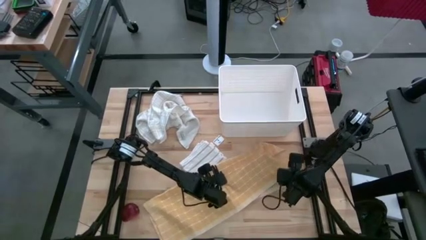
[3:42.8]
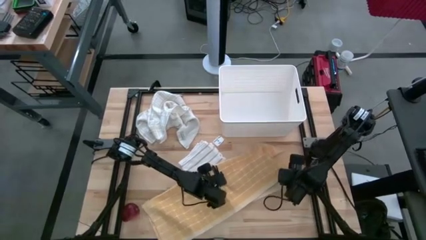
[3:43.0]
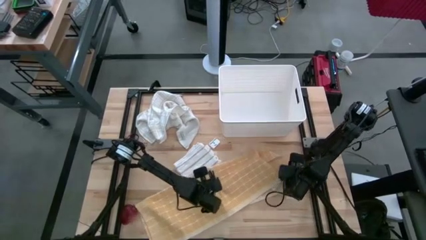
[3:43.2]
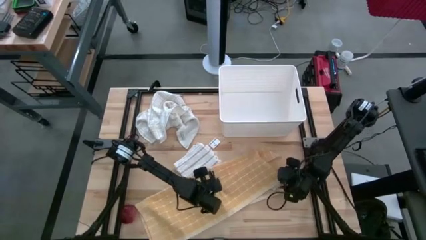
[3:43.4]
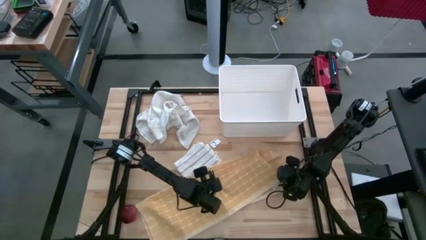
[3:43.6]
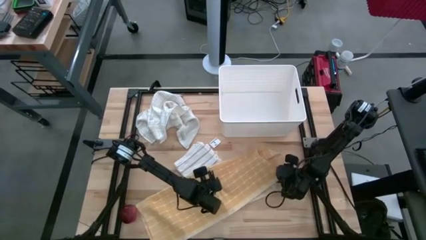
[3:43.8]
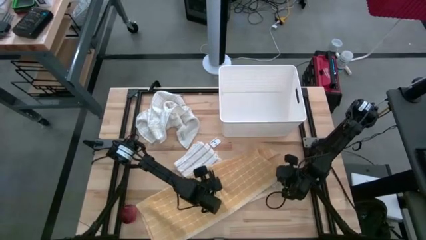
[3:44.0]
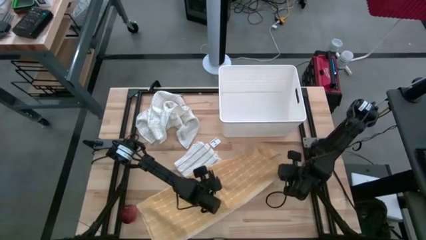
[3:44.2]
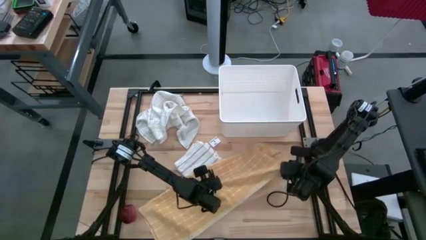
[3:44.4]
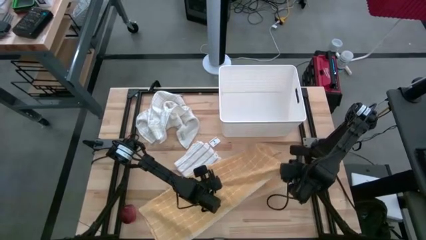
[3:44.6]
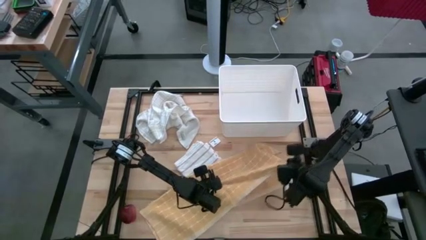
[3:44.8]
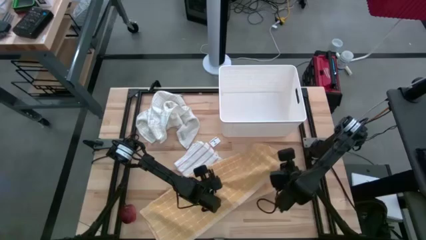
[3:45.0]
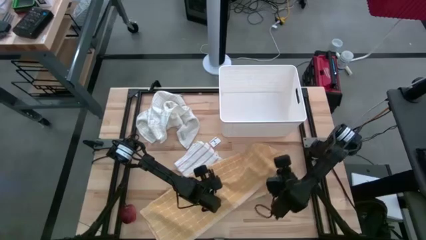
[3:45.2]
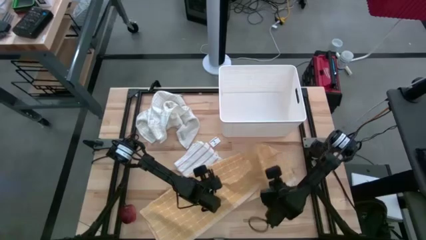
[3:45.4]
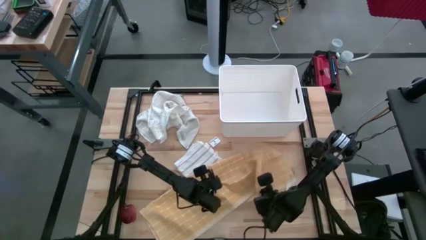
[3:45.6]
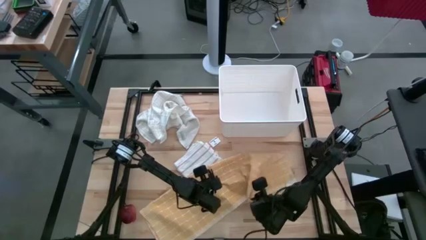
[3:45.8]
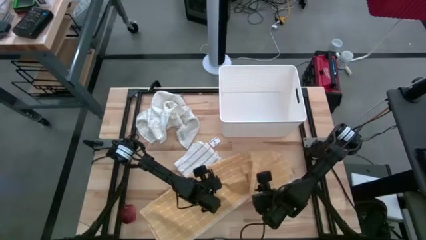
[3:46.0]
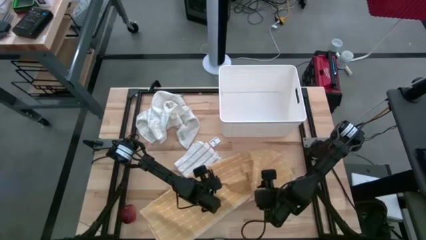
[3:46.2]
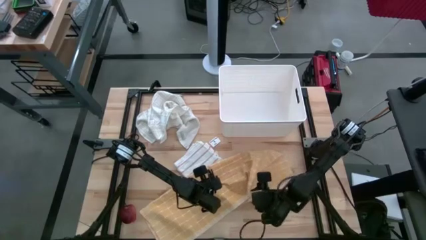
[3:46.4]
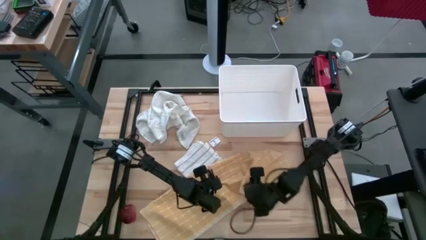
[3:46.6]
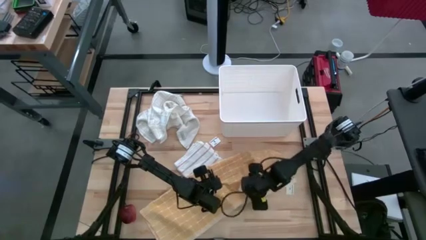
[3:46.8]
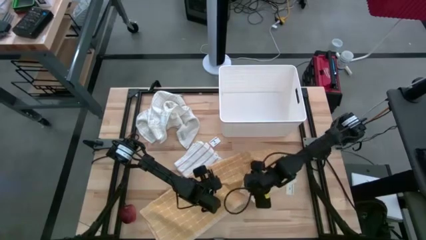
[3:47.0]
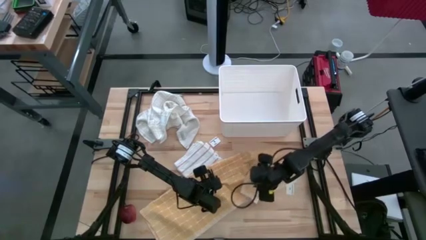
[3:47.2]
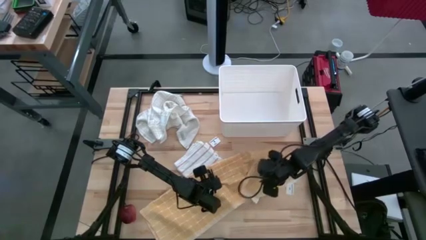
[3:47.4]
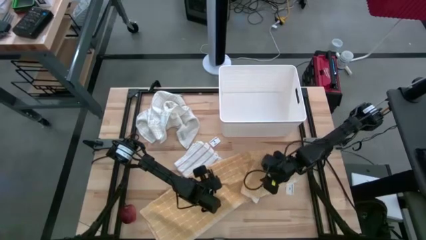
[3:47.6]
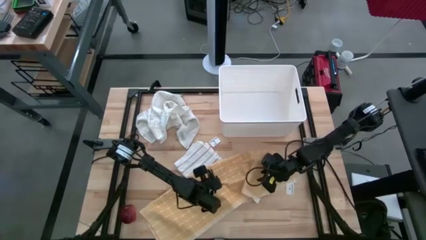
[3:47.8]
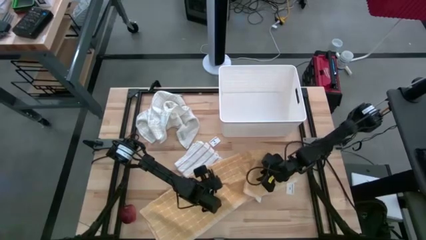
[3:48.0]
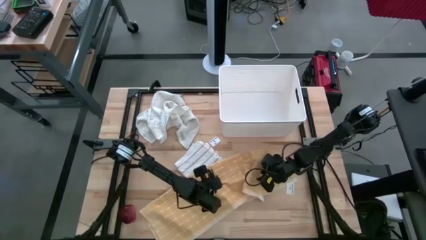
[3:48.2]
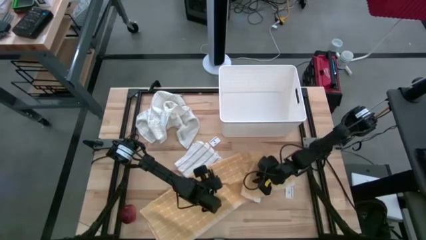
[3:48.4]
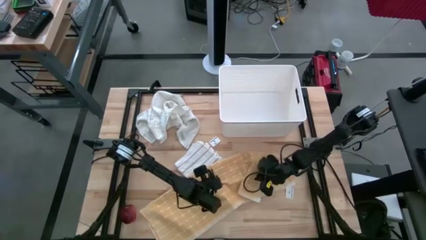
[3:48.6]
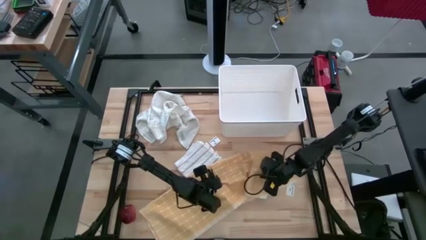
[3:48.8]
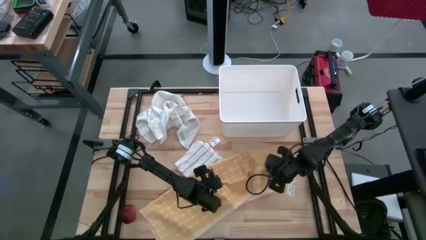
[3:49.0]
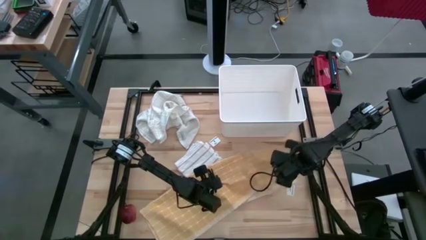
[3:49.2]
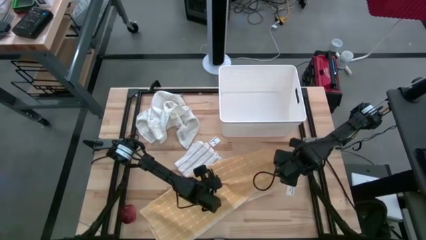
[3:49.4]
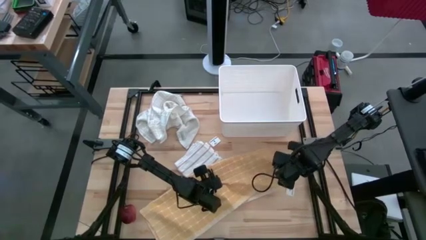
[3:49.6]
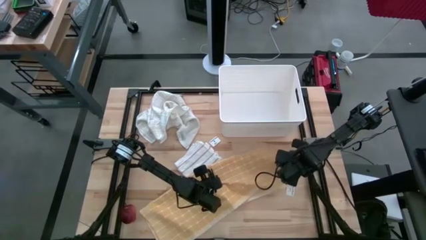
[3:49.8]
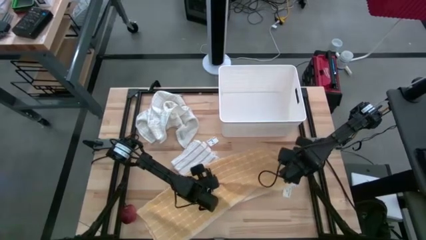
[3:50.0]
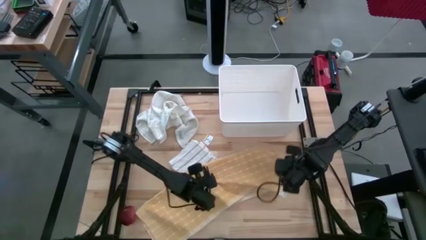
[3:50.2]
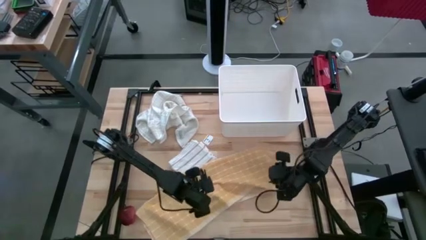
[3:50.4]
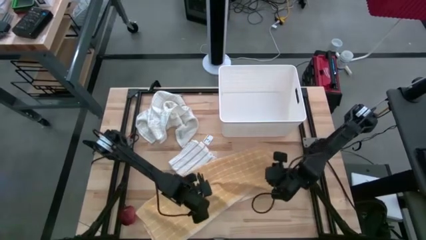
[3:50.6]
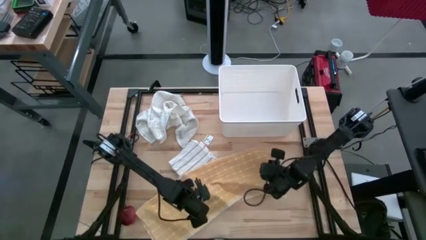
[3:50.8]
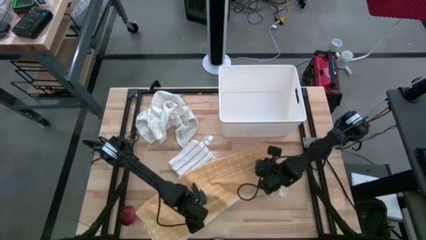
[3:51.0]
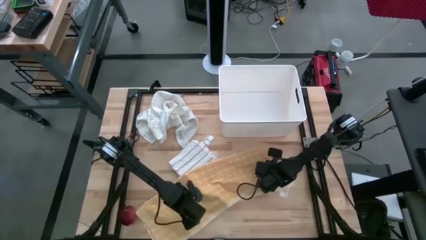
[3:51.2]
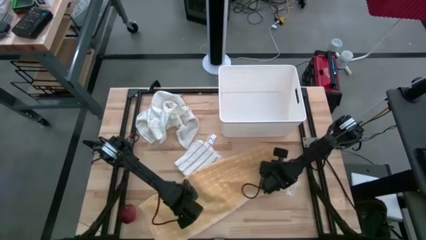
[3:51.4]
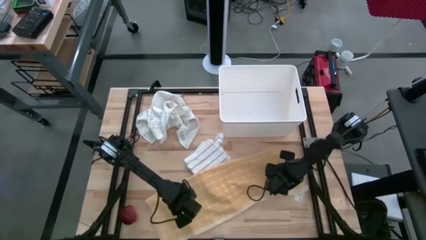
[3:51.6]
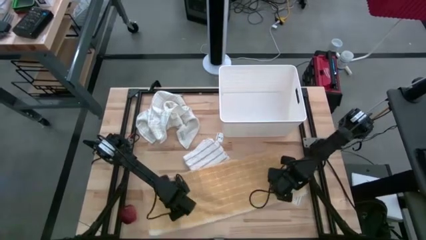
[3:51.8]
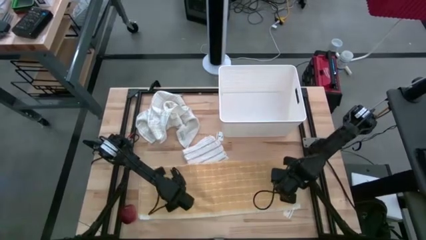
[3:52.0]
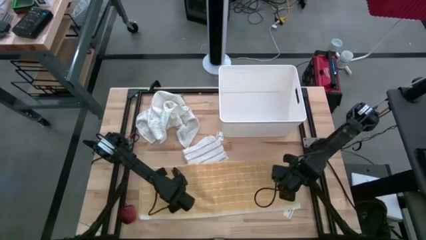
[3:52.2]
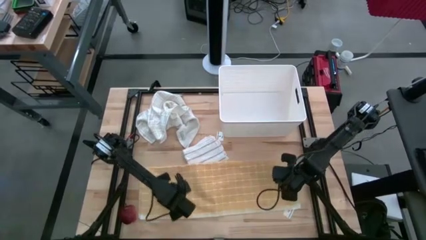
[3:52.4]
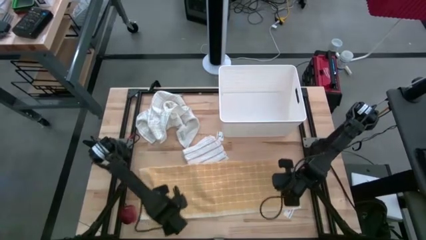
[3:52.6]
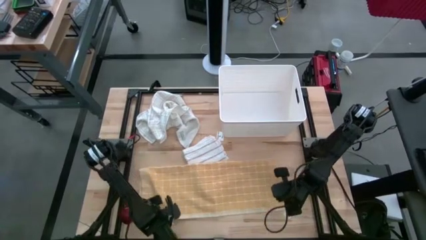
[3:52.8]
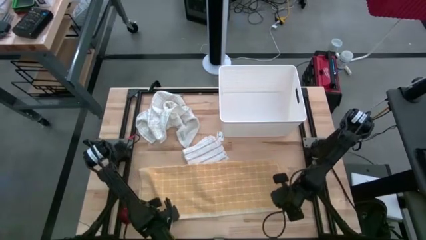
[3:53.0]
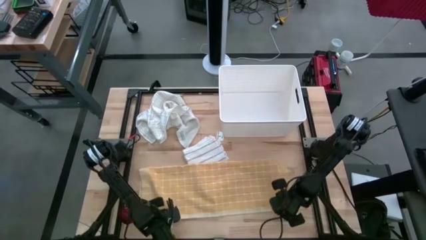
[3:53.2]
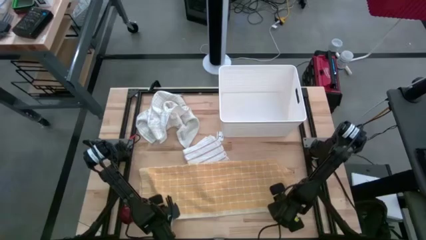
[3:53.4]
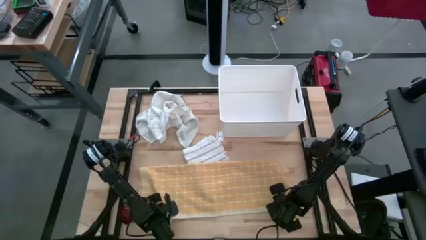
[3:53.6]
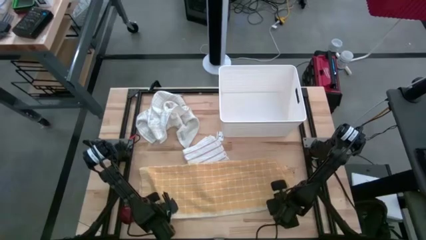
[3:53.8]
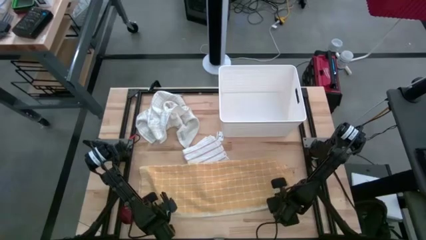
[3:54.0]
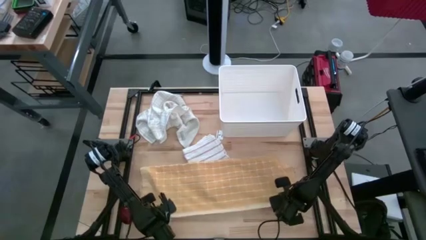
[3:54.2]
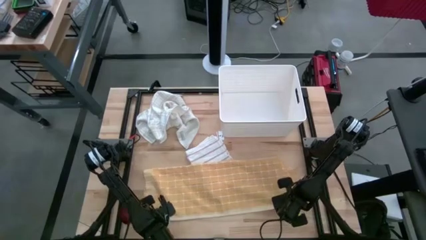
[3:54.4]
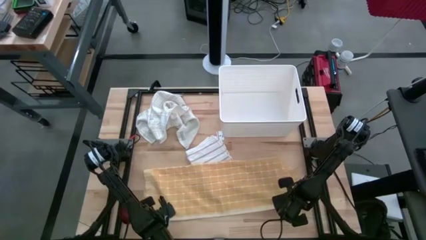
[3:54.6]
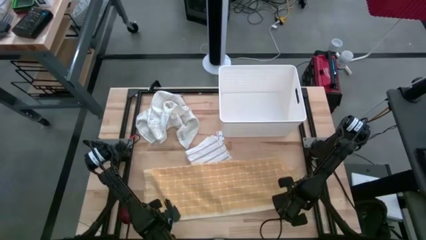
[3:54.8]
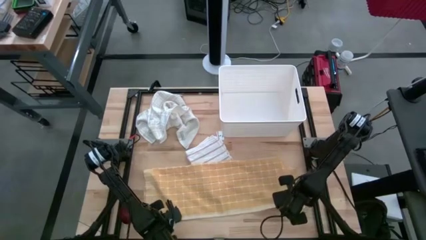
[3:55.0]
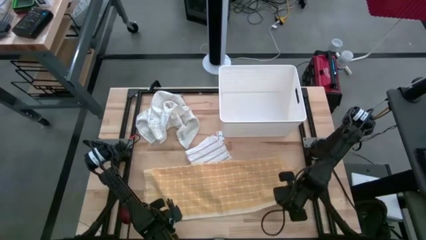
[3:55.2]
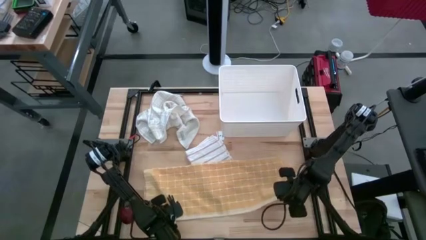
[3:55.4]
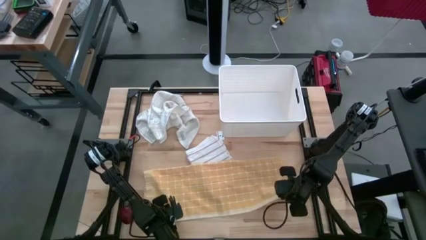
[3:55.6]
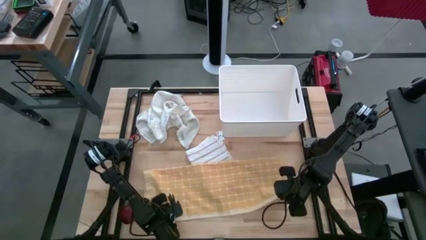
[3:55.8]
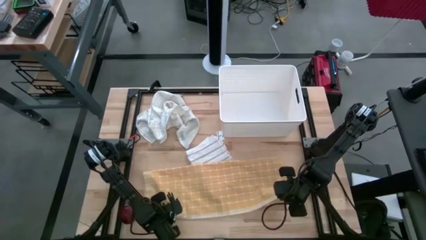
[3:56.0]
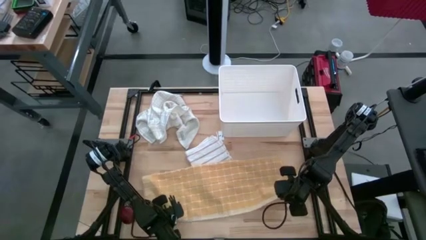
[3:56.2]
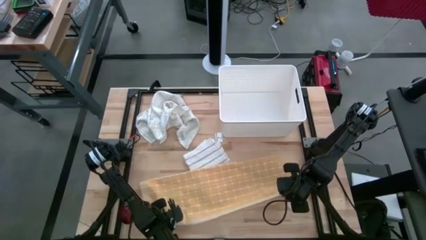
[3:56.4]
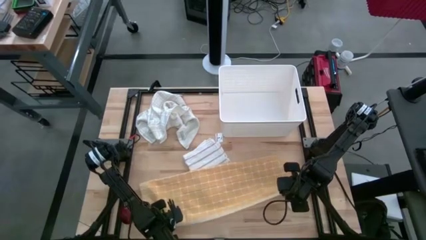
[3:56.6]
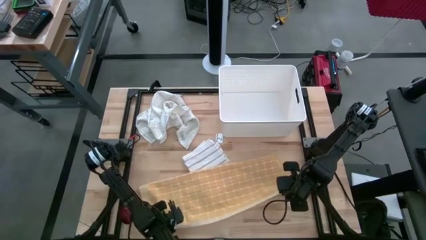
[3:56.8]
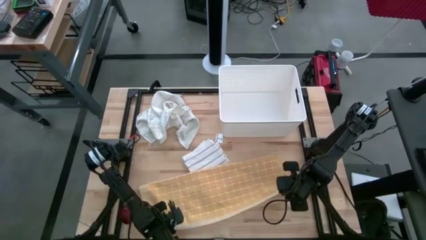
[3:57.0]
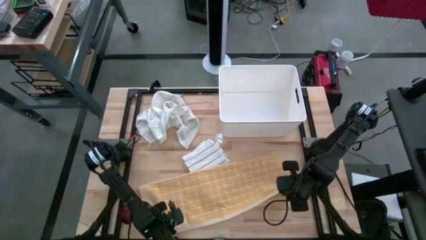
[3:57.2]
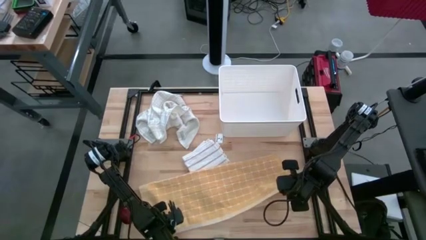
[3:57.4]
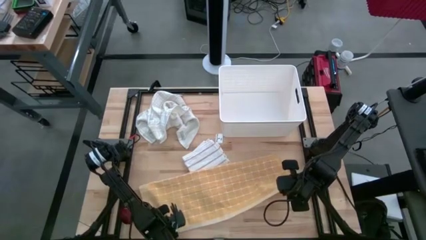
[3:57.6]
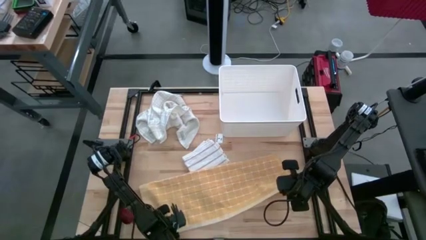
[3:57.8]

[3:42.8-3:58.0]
Task: Fold towel
Fold the yellow squared towel

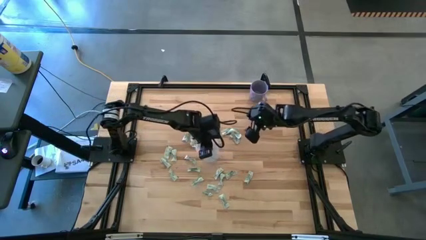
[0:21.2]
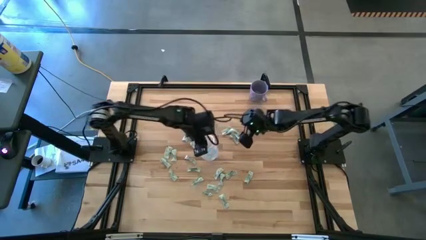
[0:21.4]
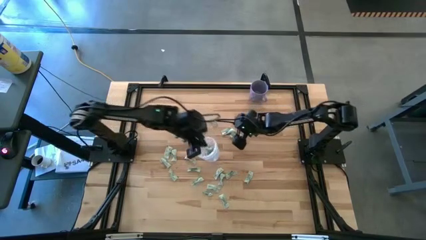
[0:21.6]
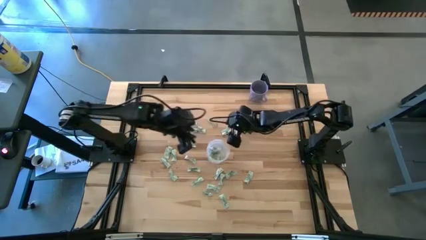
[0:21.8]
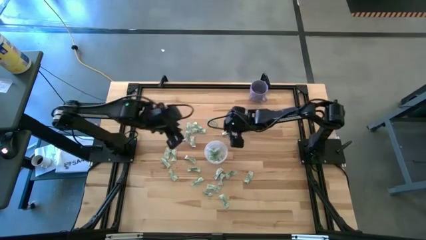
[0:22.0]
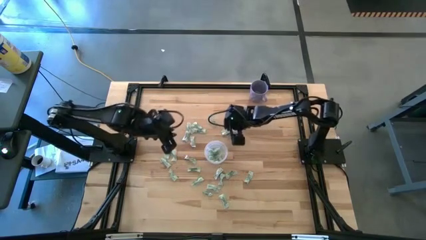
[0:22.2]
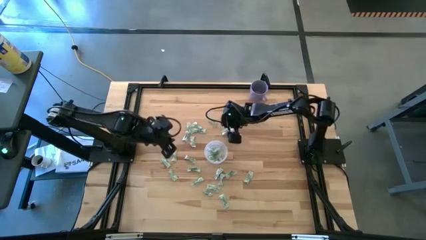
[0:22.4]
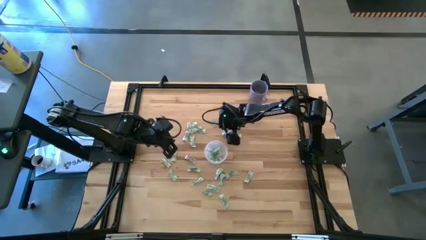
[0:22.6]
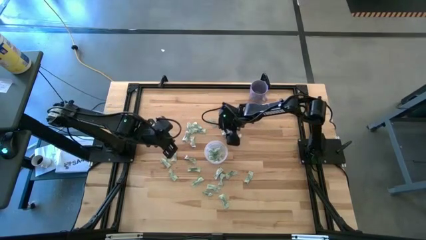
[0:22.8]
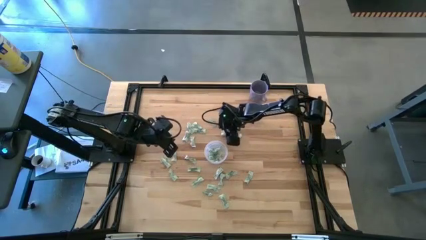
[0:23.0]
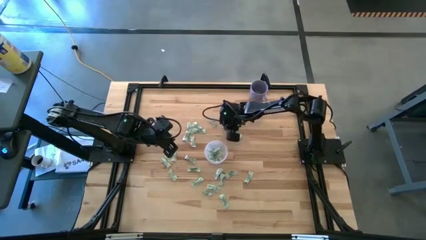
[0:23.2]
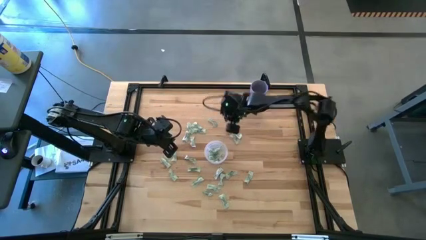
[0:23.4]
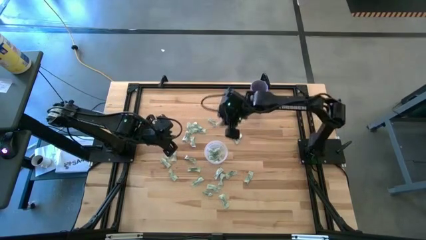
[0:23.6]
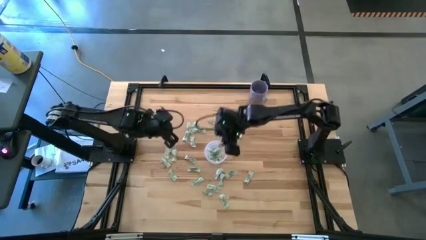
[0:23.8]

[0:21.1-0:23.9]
Task: Pick and place Stevia / Truvia into bins
Put the green stevia packet into the transparent container
